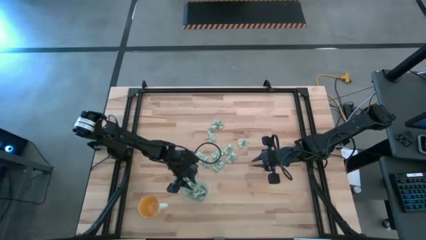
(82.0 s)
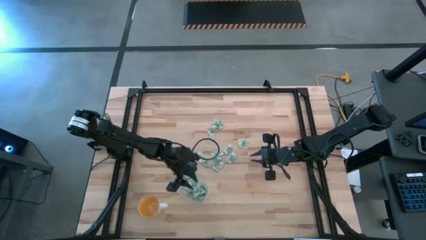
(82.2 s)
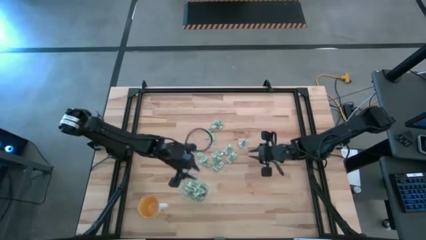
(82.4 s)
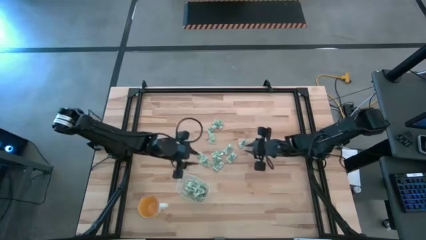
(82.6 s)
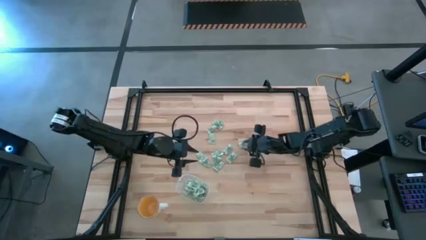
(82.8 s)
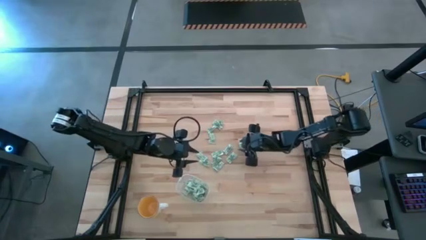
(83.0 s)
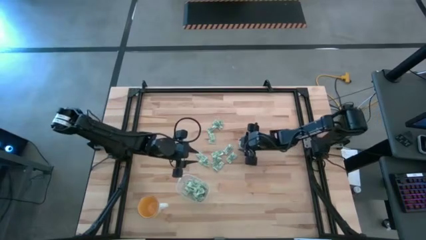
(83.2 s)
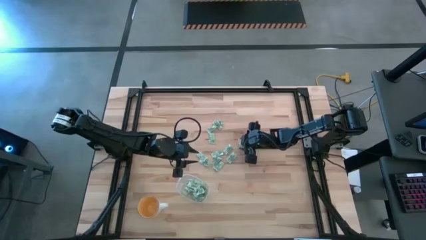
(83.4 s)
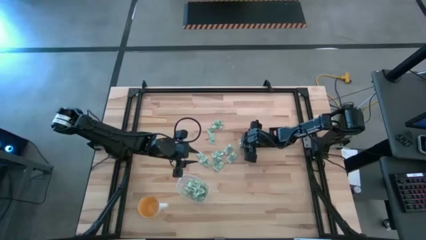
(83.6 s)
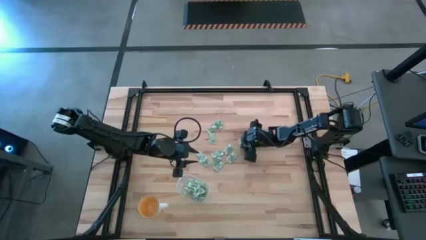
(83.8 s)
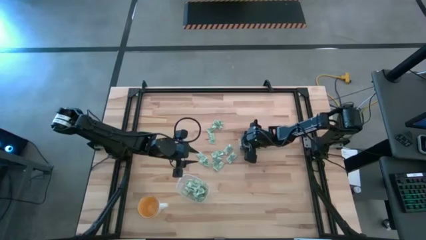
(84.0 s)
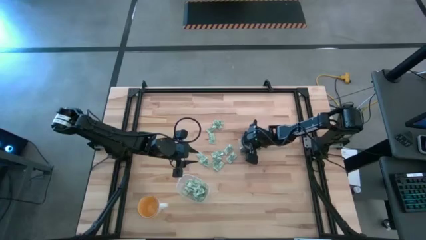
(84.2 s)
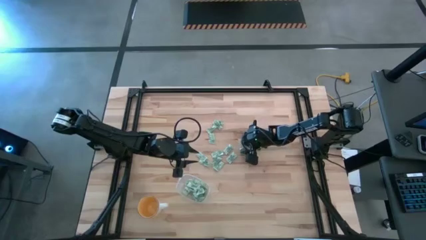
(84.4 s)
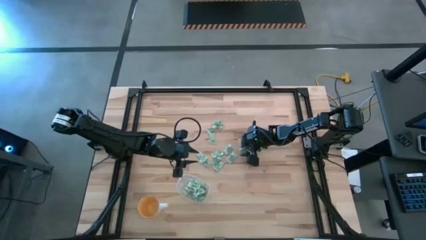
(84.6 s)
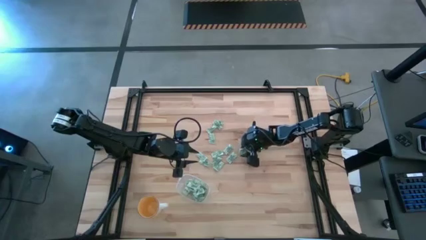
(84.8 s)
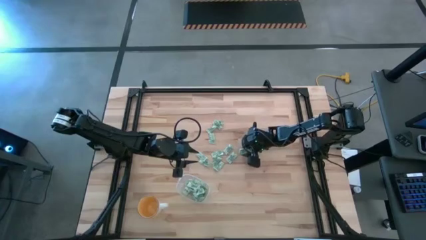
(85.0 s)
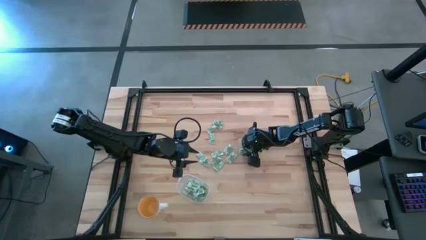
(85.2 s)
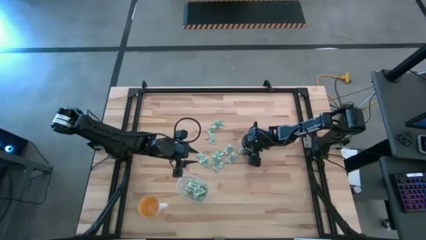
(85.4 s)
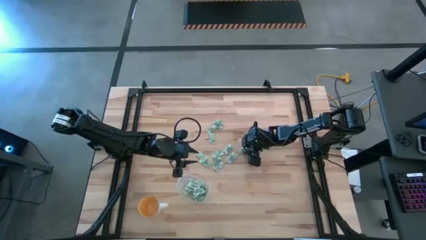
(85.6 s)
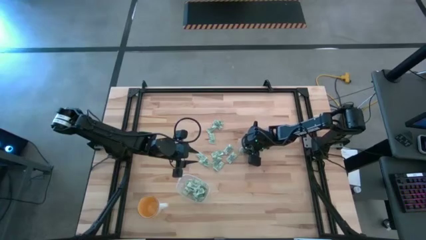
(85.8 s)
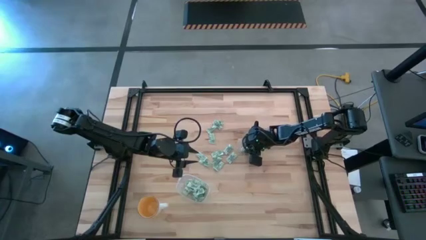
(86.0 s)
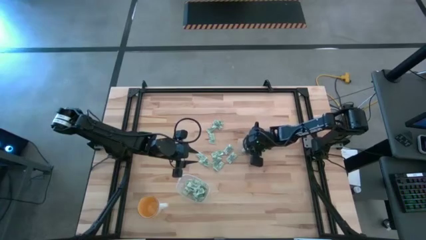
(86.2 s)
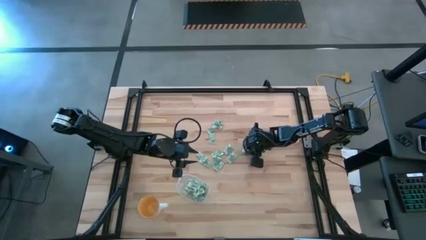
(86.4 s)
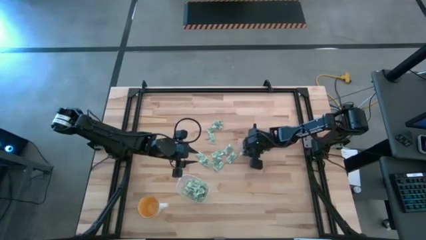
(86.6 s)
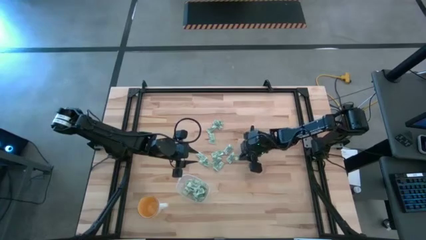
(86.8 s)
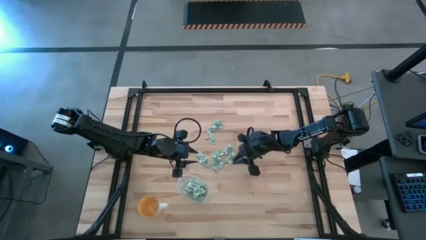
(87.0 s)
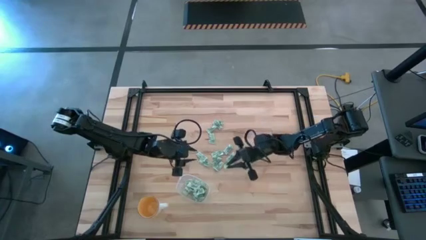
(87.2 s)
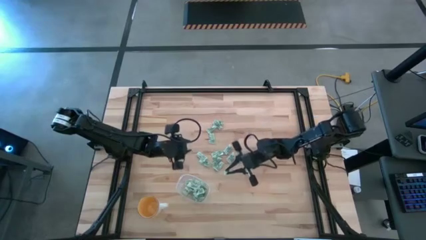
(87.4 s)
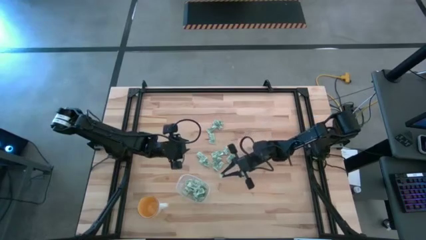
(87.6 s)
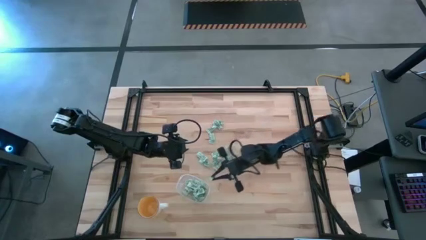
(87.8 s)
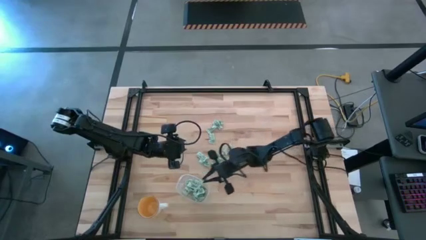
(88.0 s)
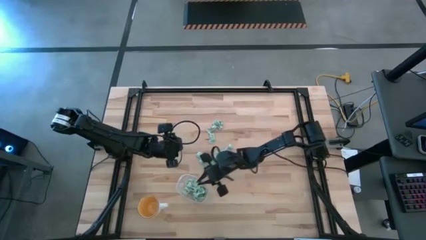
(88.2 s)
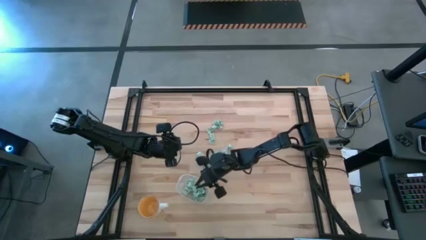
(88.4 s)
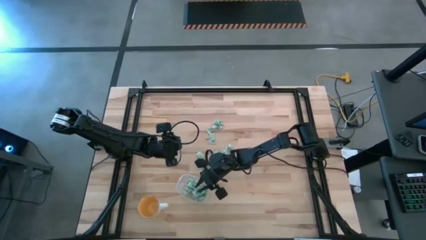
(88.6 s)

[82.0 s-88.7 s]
Task: Pick and place Stevia / Truvia into bins
Put the stevia packet into the transparent container

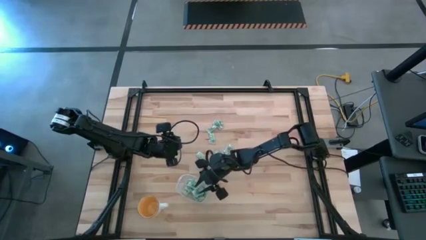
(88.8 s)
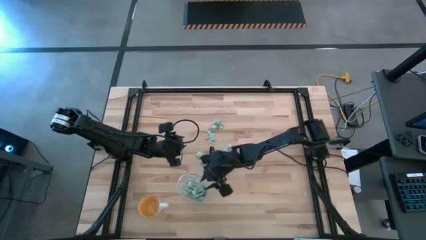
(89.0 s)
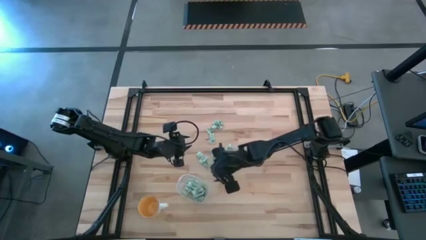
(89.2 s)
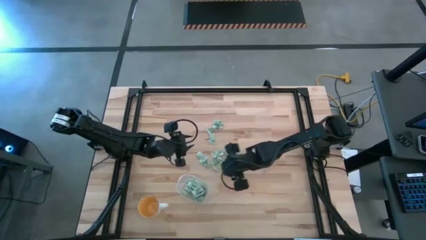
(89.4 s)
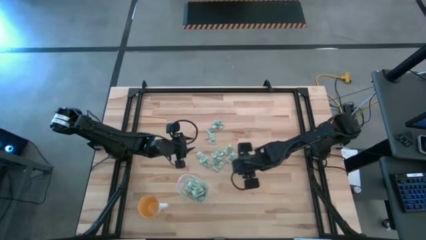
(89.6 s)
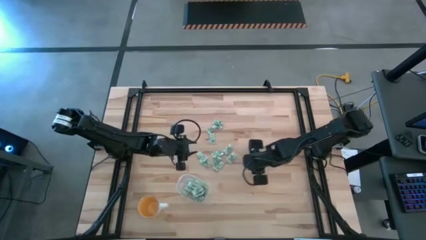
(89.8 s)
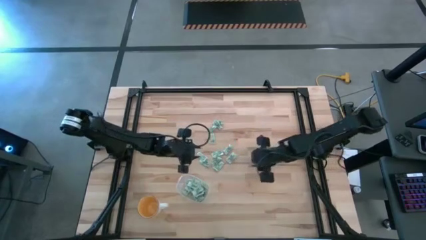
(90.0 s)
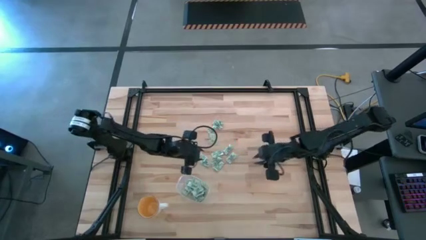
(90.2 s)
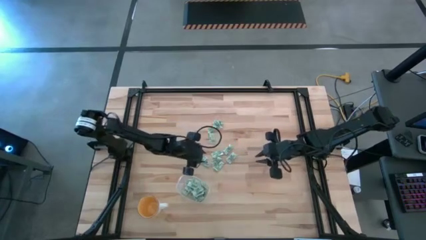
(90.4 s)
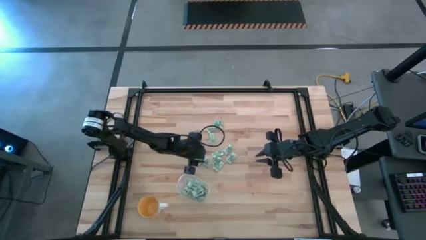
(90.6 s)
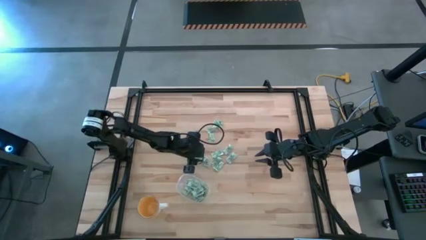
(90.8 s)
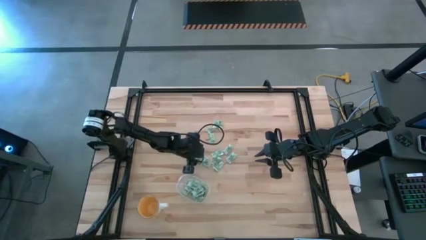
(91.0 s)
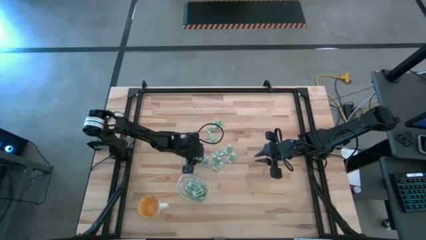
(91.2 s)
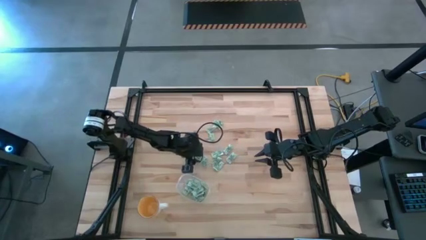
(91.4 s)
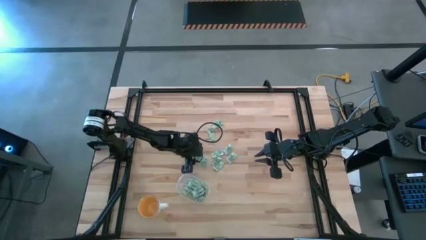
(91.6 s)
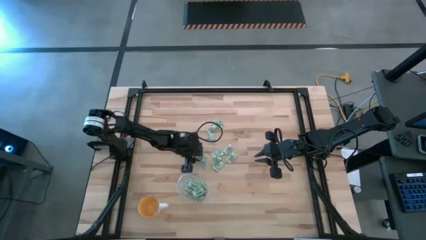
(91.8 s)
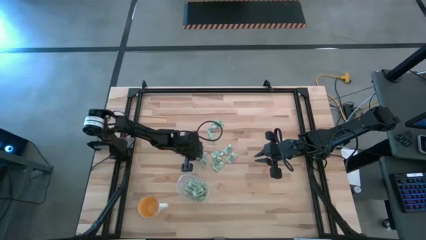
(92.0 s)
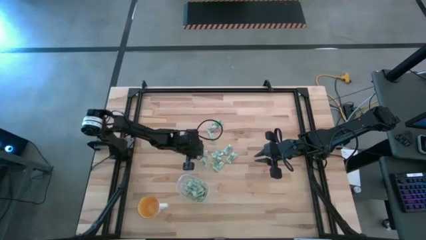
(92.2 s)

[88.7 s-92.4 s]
Put the stevia packet into the transparent container

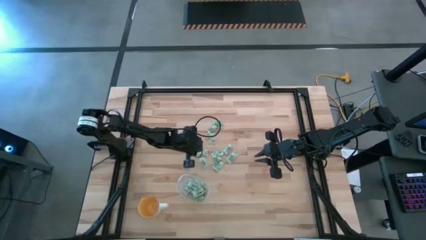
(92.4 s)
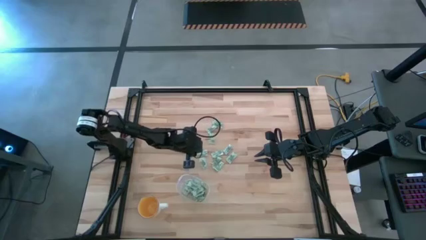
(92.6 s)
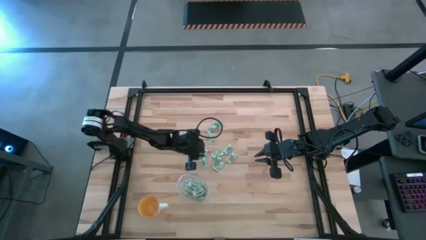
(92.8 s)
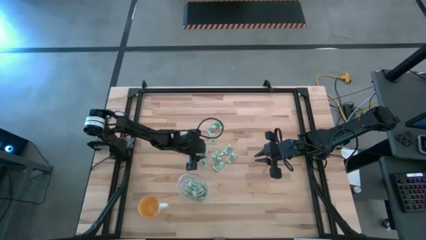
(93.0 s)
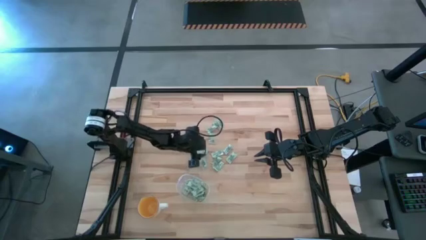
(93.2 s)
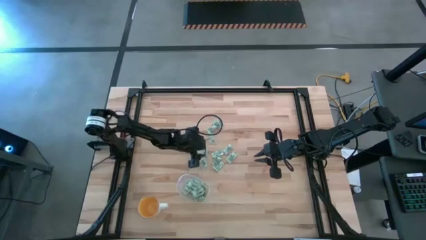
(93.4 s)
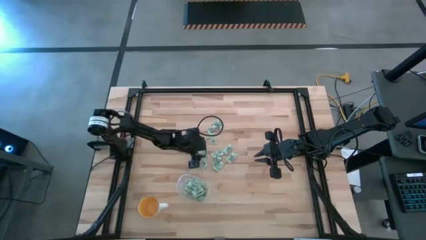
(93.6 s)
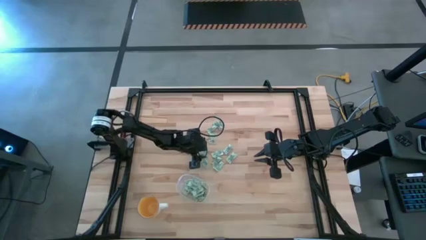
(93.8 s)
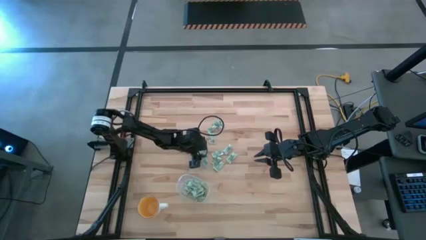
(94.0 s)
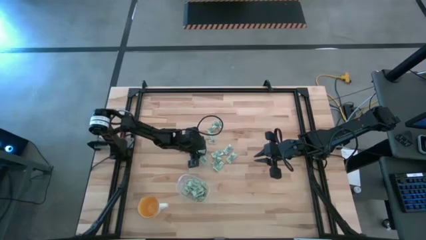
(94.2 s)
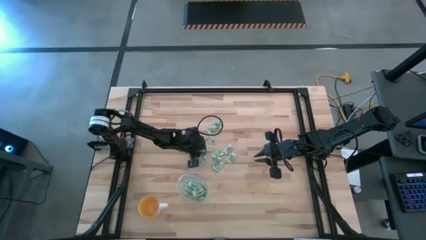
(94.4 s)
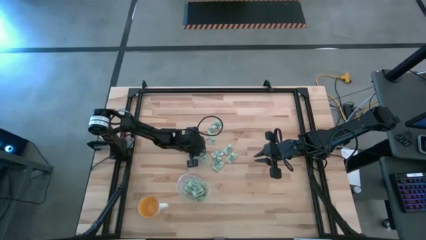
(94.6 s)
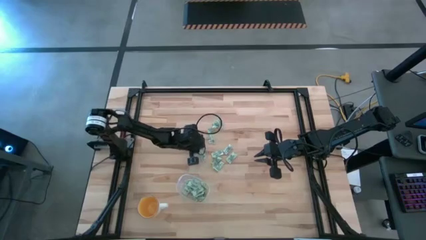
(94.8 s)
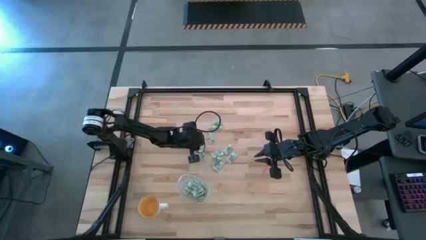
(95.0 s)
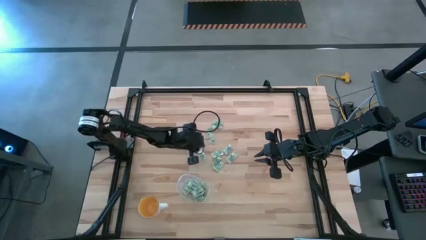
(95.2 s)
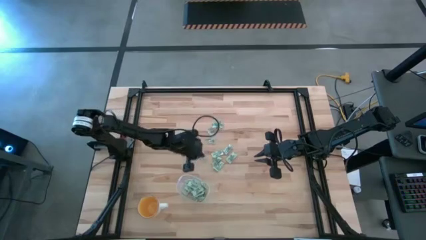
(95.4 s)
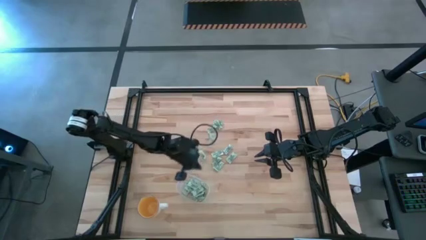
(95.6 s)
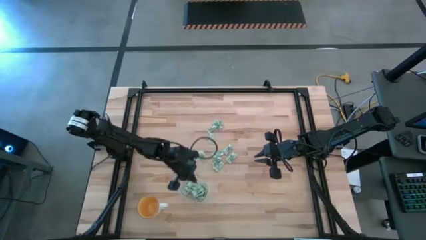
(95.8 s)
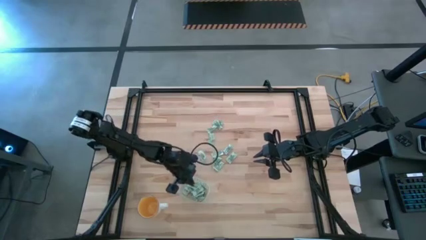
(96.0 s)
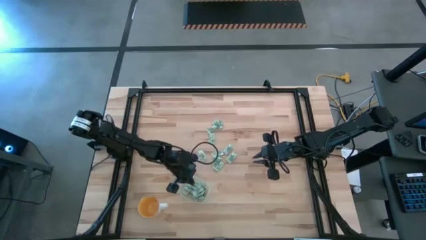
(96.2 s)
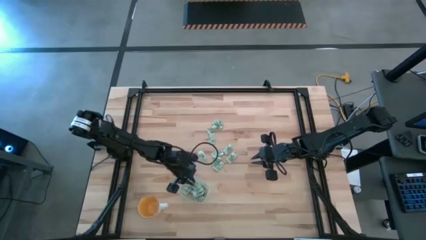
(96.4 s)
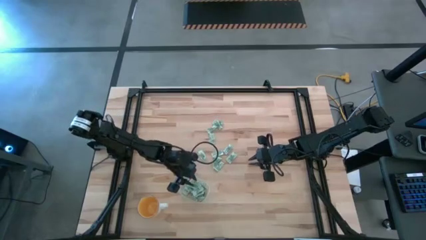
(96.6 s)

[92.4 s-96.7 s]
Put the stevia packet into the transparent container

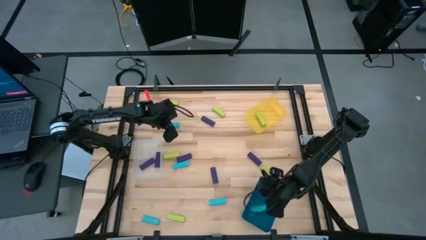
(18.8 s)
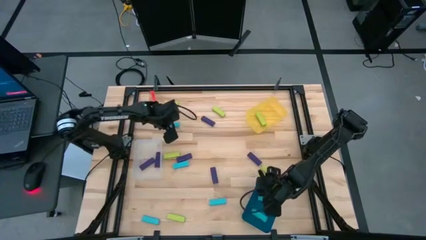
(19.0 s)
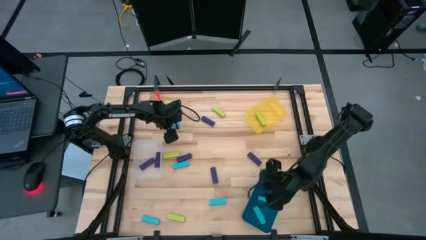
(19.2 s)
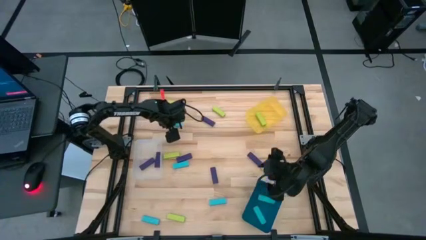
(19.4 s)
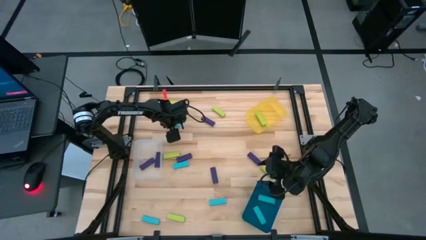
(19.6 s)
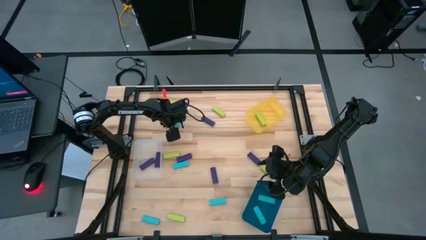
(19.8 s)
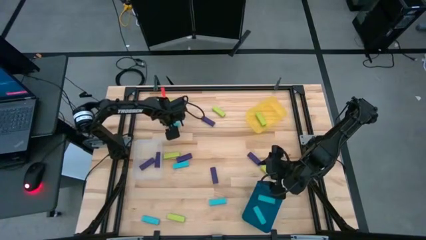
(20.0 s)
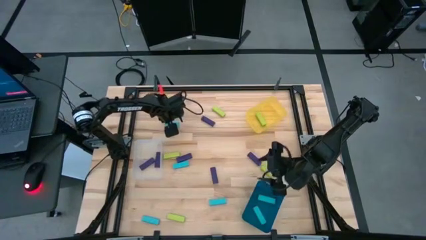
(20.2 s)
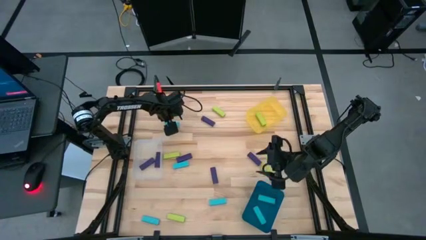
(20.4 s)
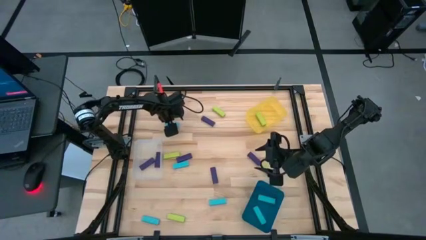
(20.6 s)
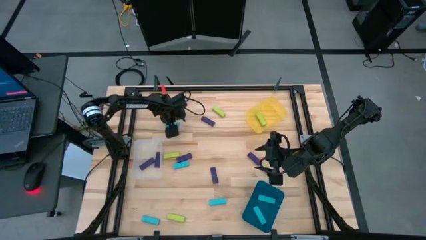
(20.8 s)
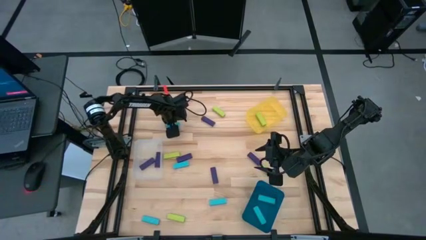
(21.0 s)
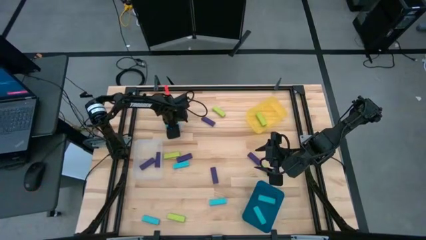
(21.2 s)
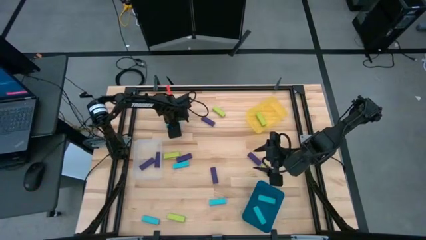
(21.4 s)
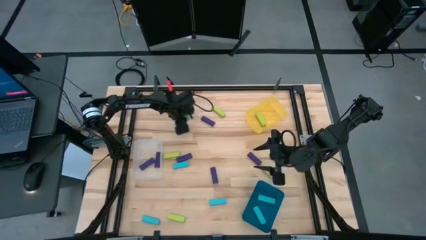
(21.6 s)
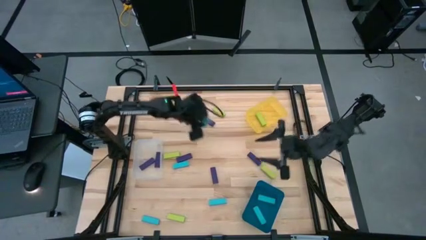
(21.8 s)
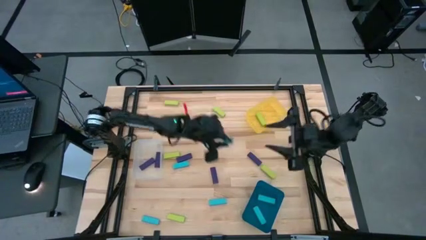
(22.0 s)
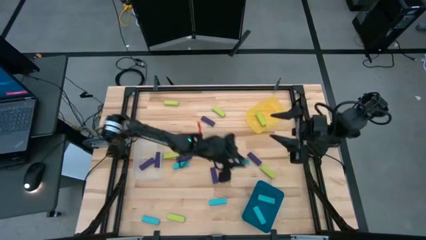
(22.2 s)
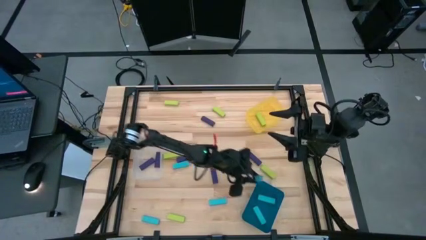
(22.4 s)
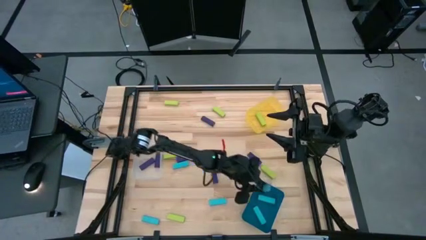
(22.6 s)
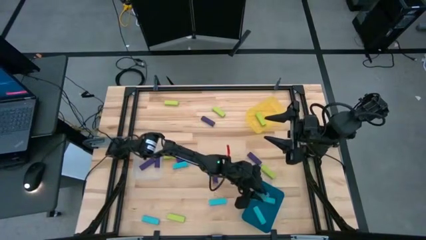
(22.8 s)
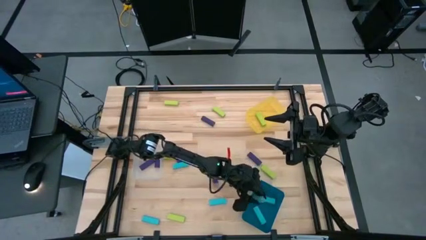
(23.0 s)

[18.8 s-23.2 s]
Task: Sort blocks
Put the light blue block into the blue bin
